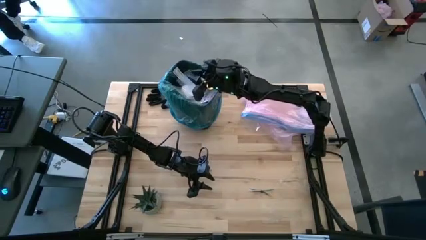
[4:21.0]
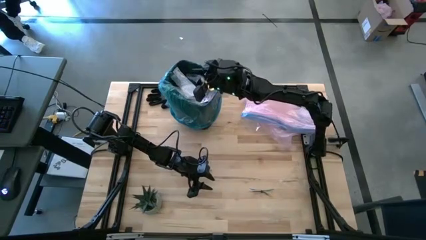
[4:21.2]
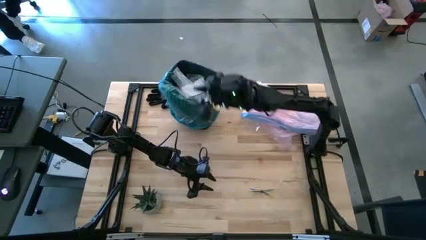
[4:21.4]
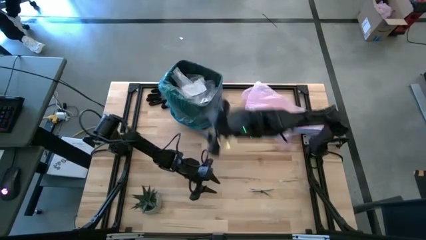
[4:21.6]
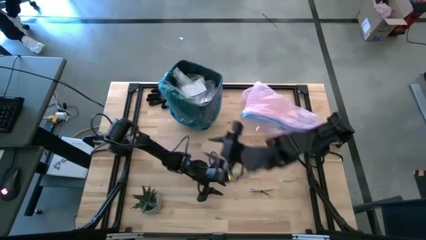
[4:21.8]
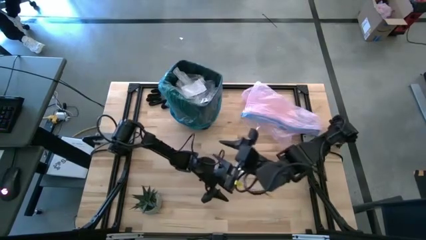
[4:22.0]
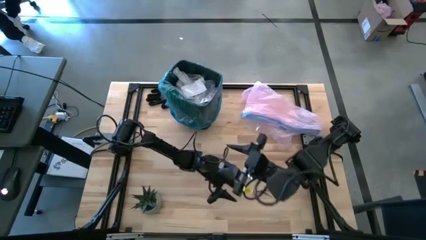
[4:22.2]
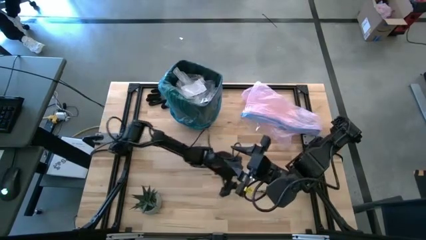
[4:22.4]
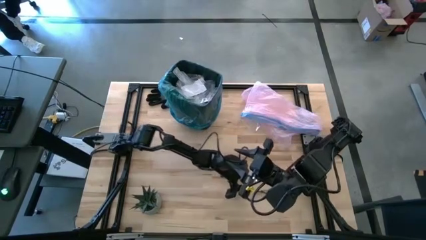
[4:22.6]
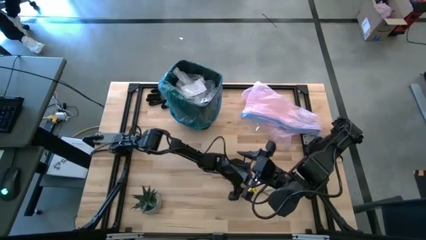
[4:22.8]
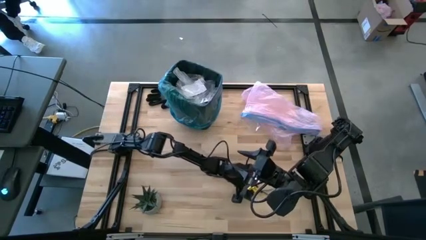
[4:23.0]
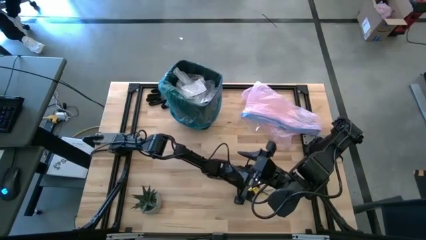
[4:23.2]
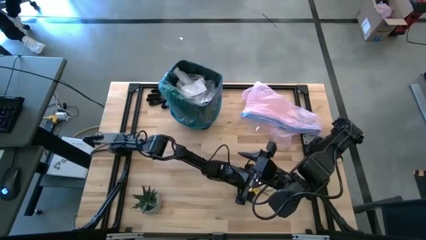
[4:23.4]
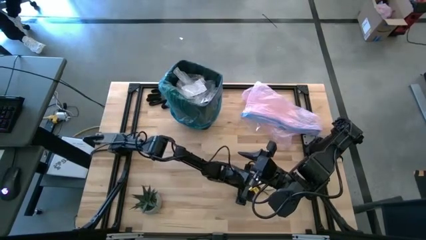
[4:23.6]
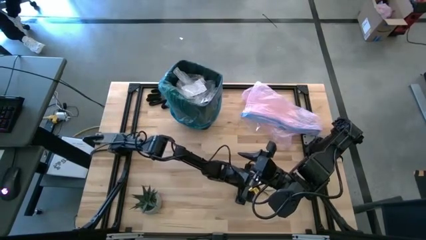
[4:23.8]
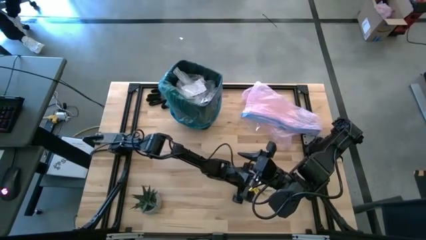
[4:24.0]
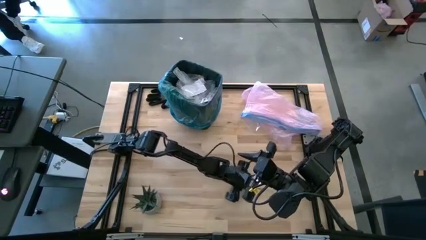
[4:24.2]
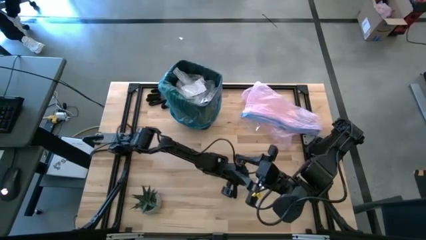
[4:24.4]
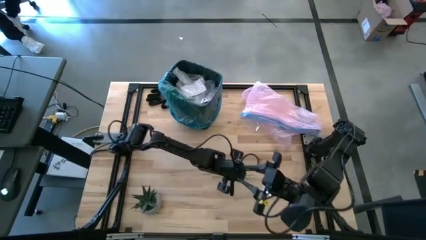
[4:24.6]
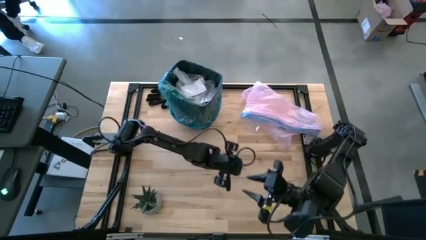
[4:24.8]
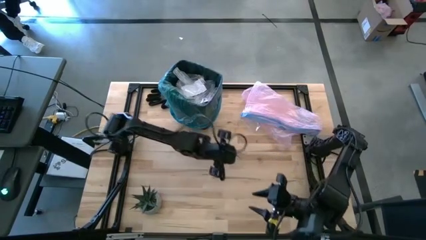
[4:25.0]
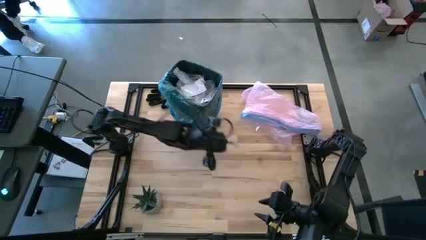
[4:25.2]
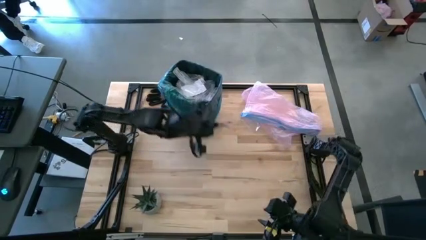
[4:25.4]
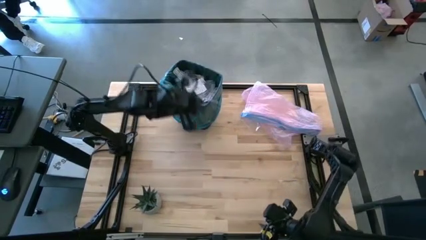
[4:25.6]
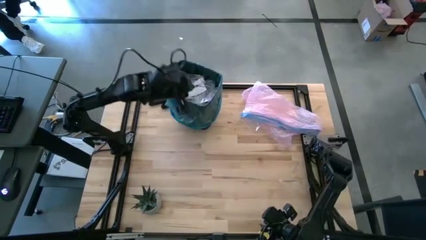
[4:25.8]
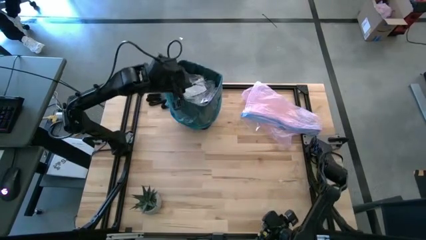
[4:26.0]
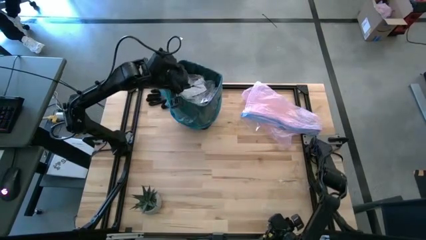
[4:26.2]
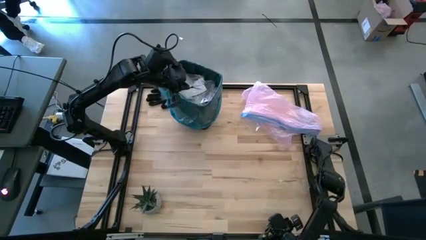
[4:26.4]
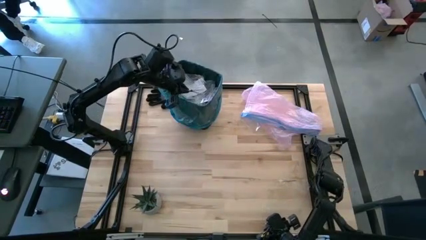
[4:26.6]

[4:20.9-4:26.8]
Task: place trash/remove bag and relplace
Put the zip tie wire into the trash bin

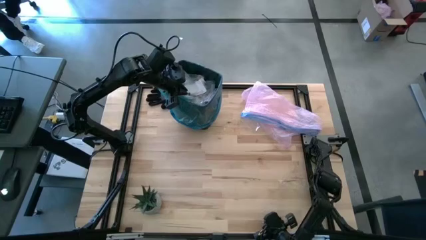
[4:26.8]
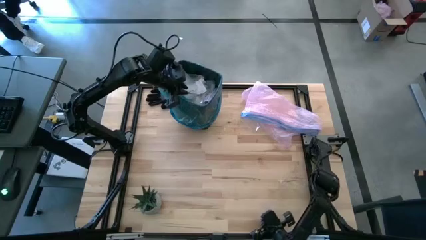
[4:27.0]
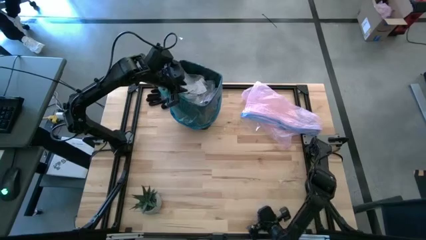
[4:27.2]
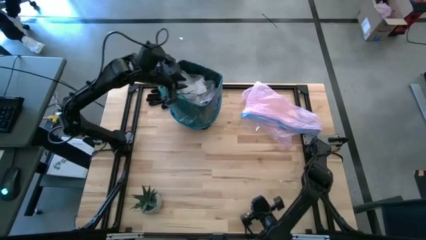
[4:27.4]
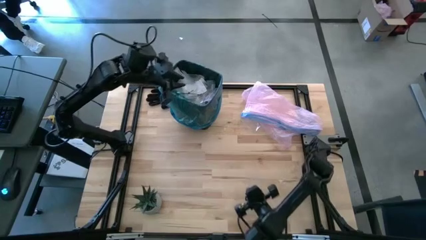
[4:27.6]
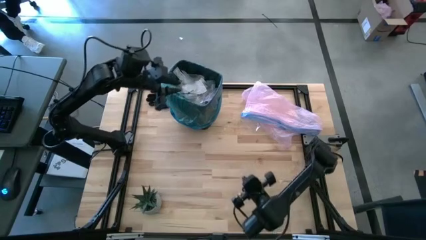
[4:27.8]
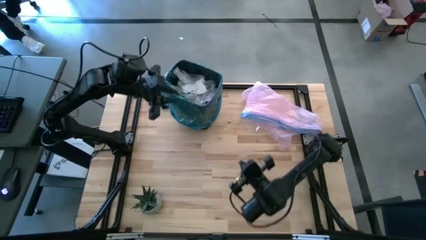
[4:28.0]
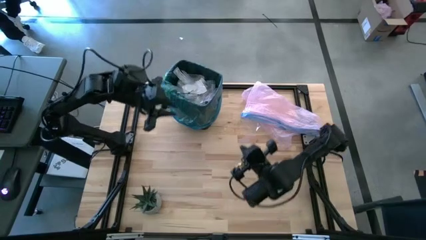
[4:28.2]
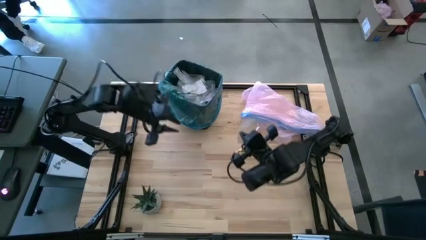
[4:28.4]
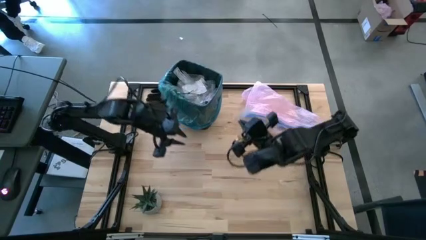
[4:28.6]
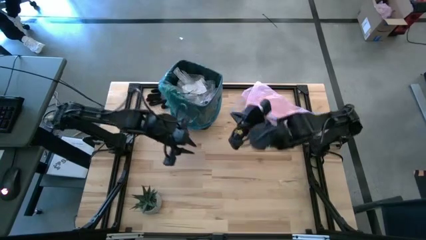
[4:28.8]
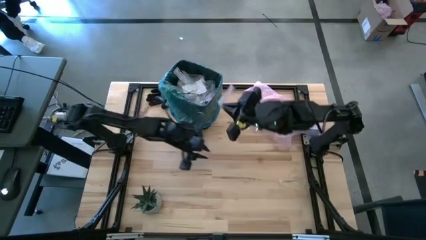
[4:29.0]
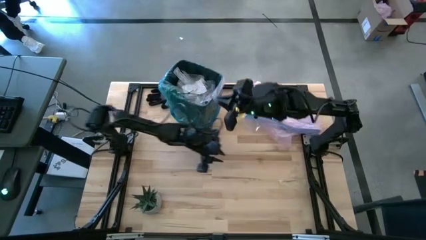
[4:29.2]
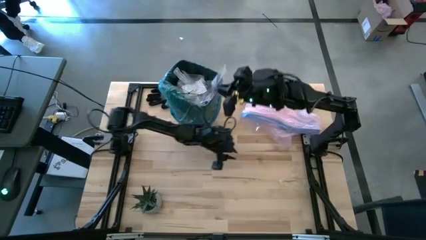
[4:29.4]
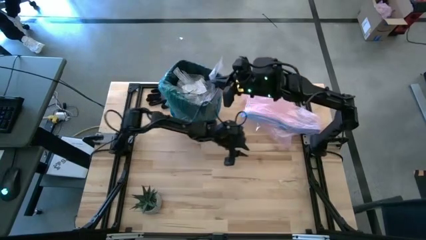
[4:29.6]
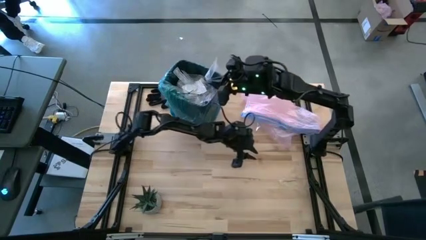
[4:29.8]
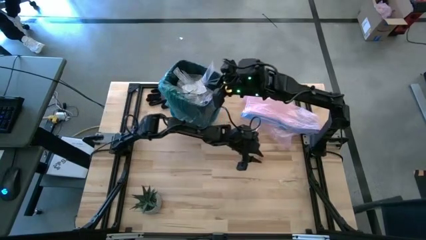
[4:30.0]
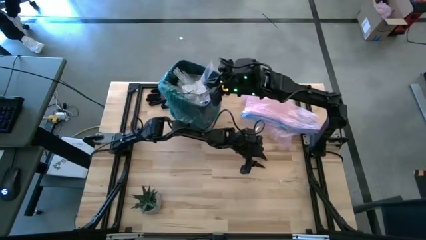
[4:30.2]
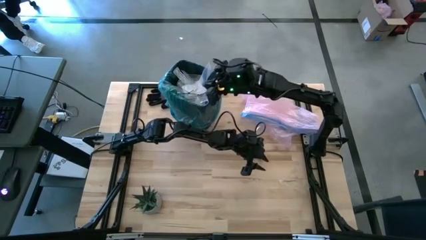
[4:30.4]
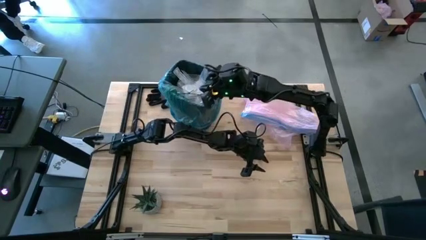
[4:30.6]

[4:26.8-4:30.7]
Put the clear plastic into the trash bin

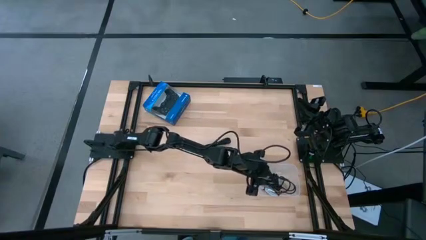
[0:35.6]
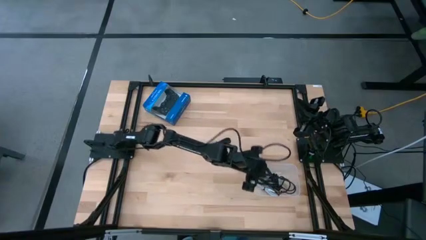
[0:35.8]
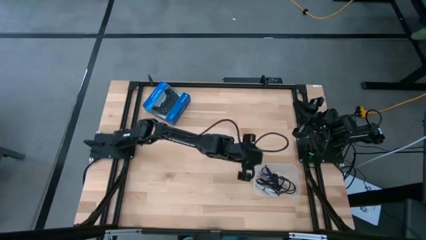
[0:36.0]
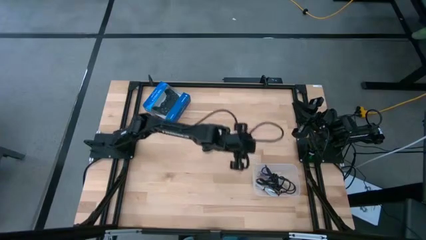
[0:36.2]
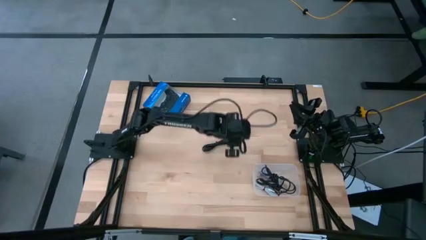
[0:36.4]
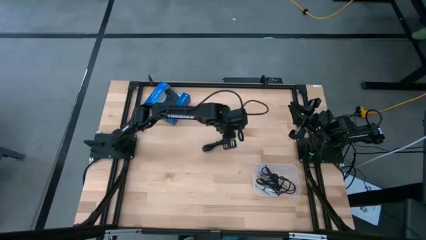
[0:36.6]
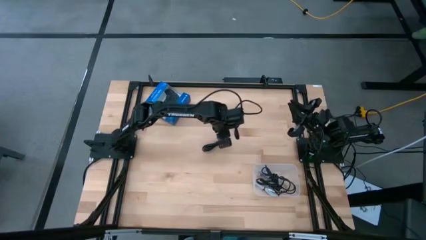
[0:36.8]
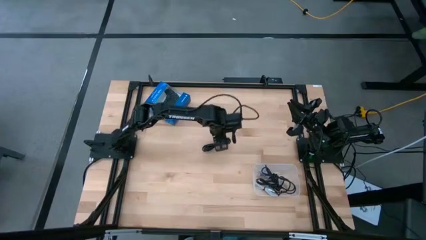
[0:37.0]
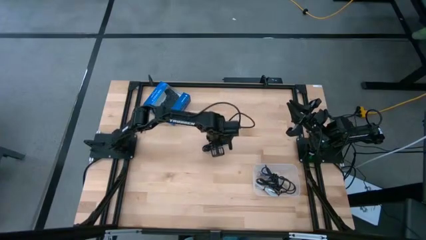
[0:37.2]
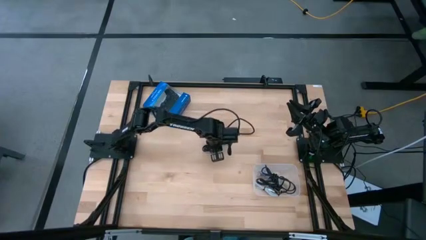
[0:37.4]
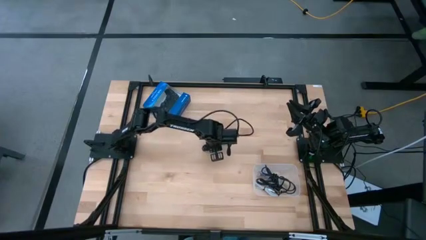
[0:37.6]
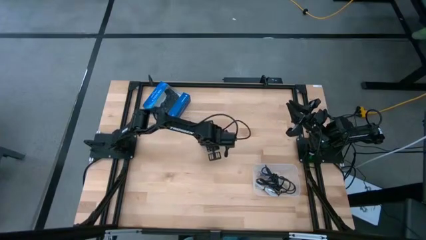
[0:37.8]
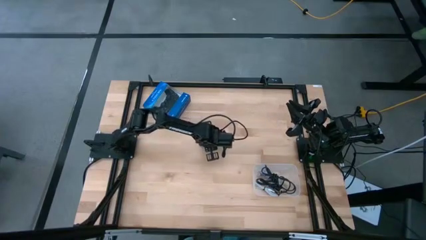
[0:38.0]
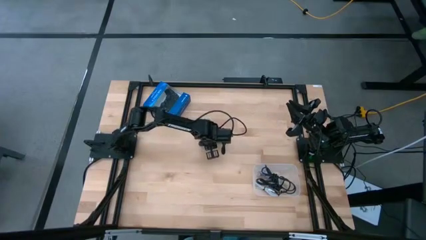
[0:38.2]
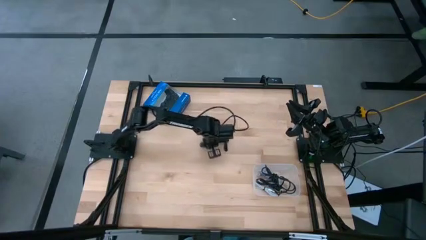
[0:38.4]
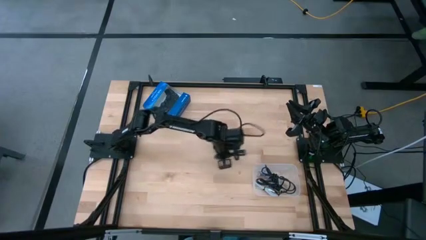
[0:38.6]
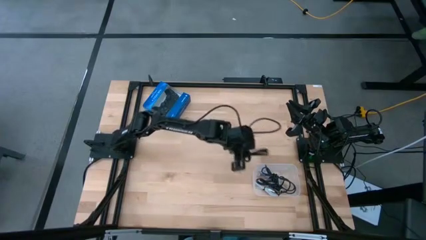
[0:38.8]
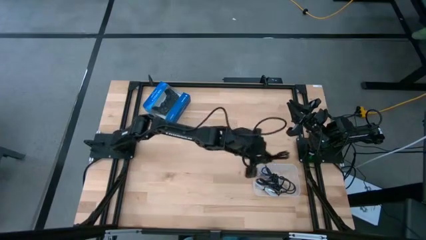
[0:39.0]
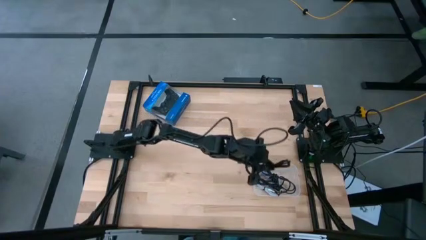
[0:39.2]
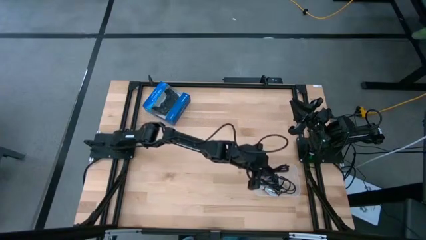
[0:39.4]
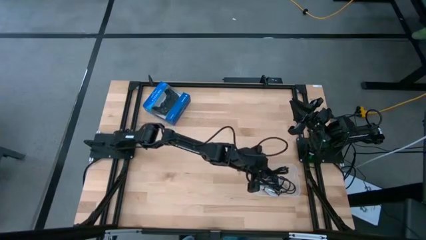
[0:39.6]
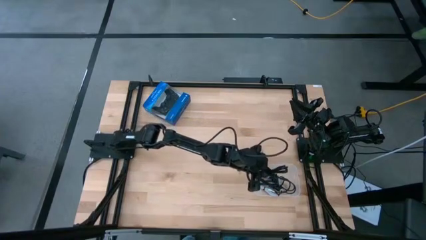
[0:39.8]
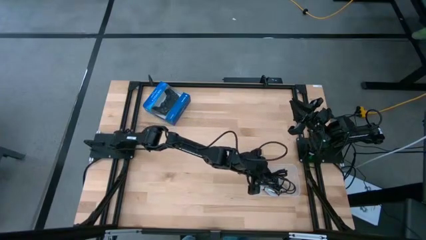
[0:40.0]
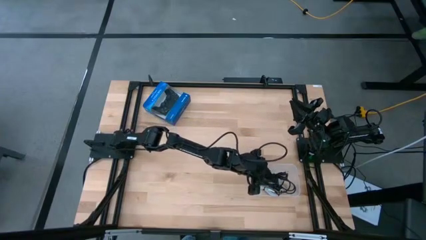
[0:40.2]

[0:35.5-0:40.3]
Task: Pick and place USB-C Cables
Put the black charger cable into the transparent container
